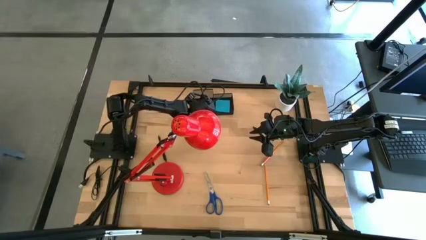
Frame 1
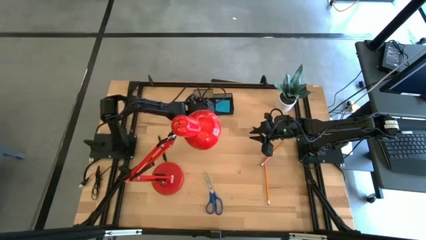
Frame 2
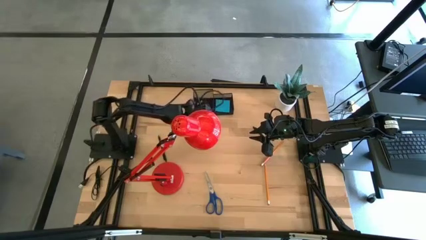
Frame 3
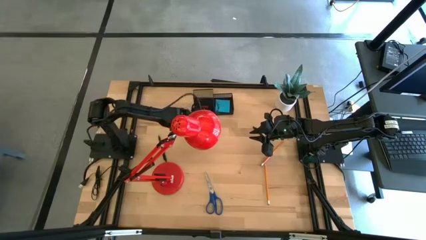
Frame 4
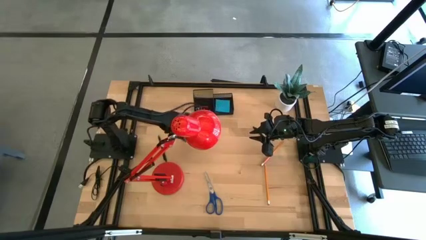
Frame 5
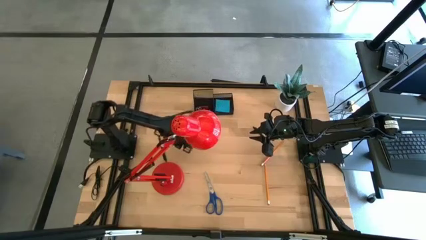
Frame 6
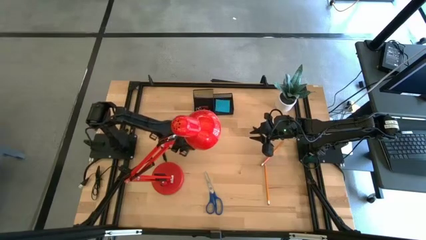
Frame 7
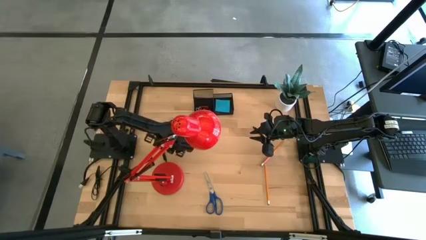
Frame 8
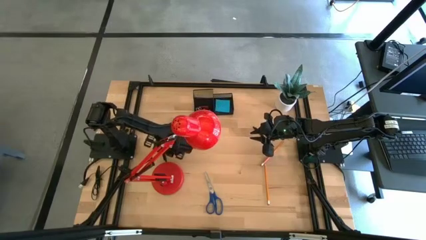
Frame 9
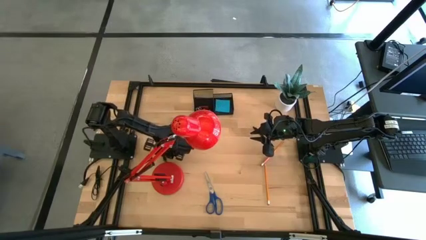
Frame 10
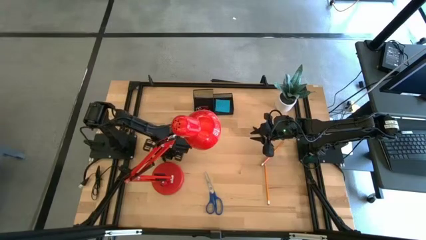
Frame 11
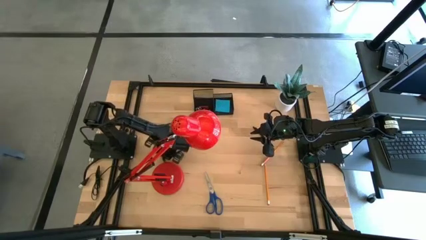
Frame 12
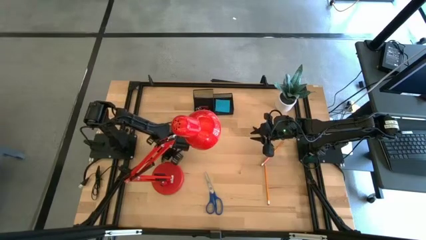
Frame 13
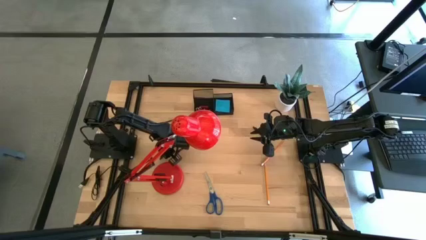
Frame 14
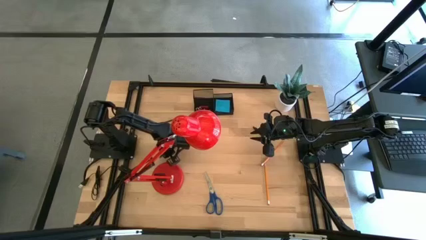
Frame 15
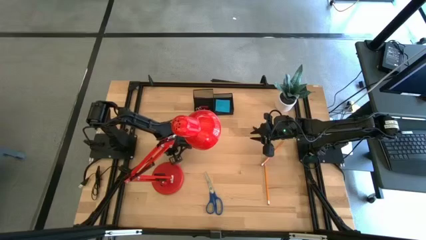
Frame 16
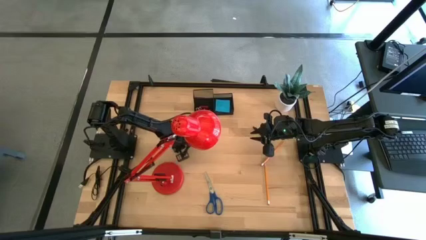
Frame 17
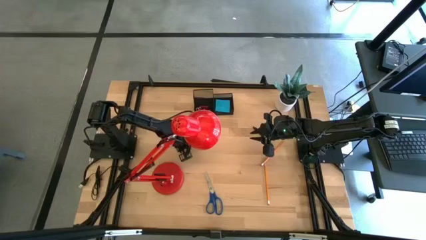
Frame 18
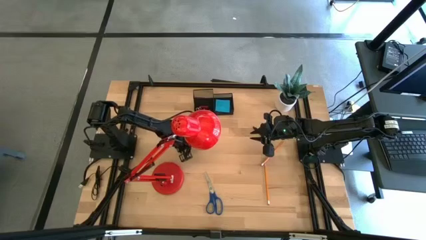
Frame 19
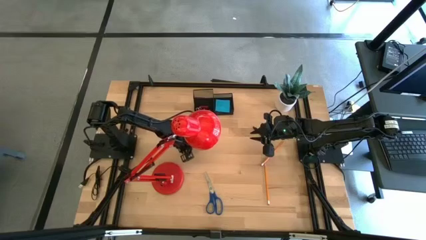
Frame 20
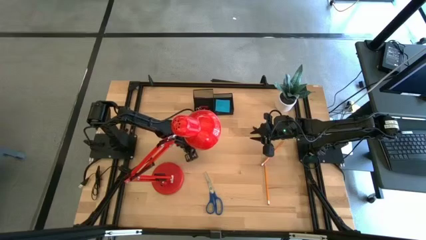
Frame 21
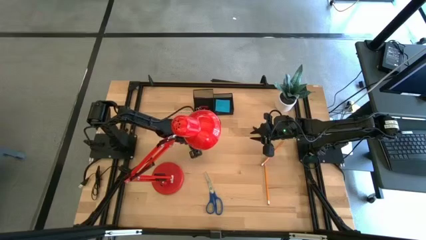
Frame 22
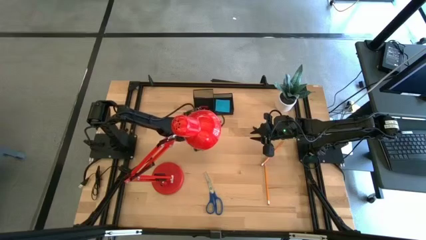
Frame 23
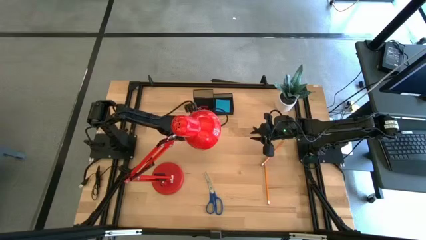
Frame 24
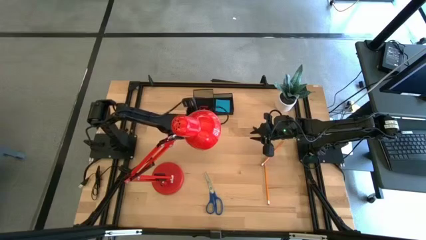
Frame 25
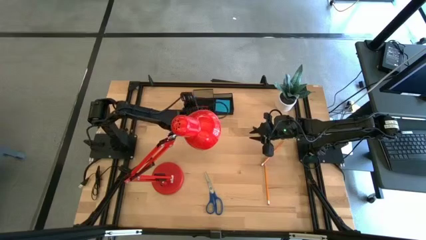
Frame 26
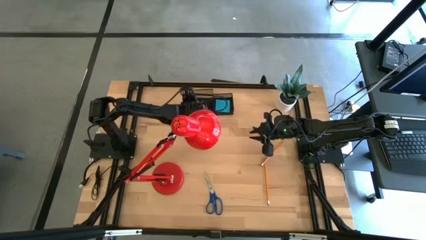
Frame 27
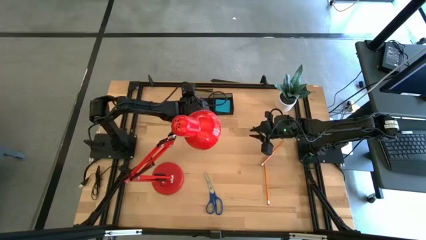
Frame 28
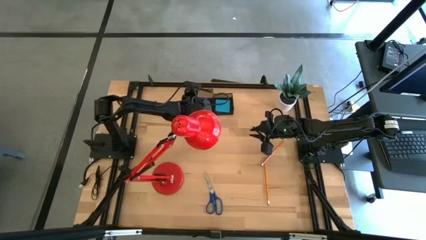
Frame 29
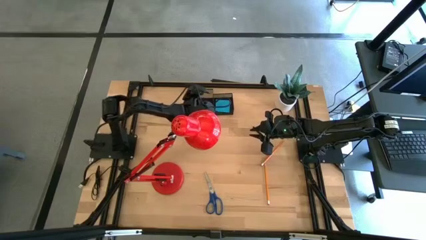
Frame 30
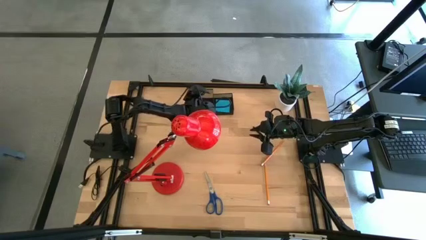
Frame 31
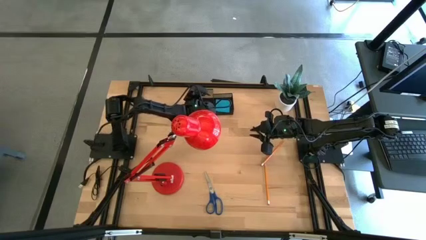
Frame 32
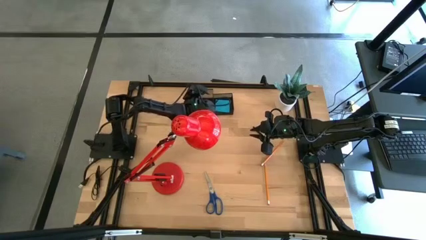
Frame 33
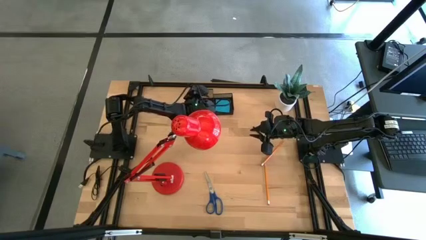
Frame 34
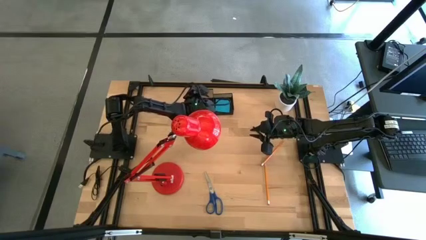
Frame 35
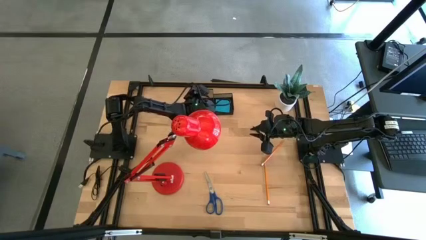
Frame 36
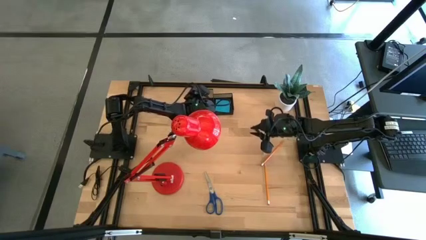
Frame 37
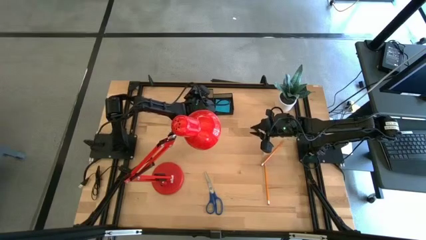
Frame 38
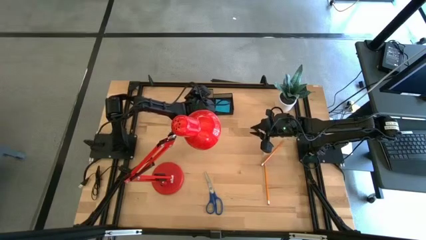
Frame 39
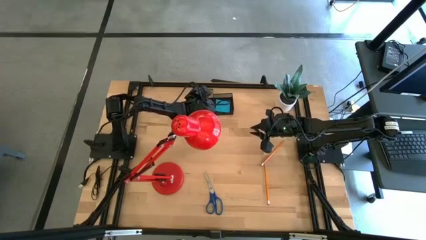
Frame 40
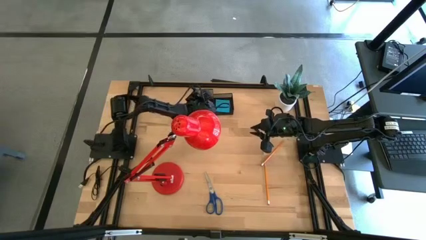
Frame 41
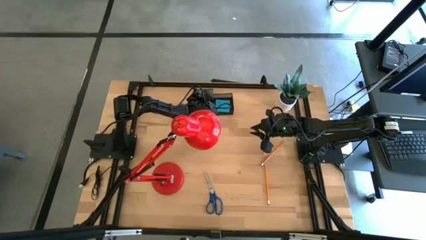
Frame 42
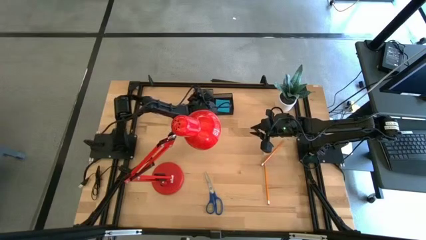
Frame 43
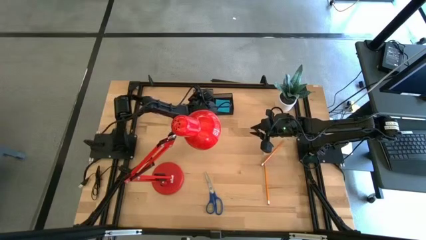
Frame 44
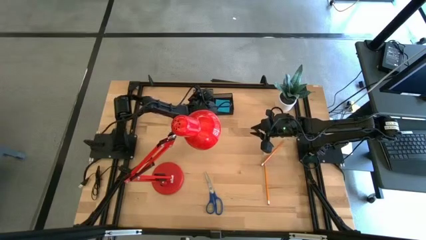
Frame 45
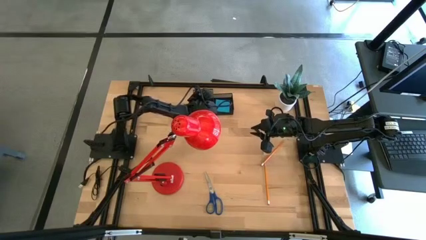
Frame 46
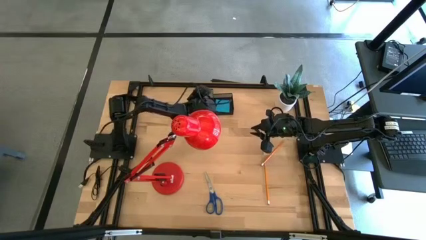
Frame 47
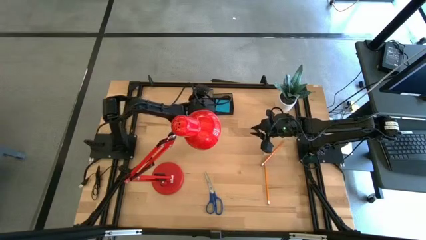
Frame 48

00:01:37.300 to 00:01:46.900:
Task: Pick and place office supplies into organizer
Put the left pen into the desk organizer
